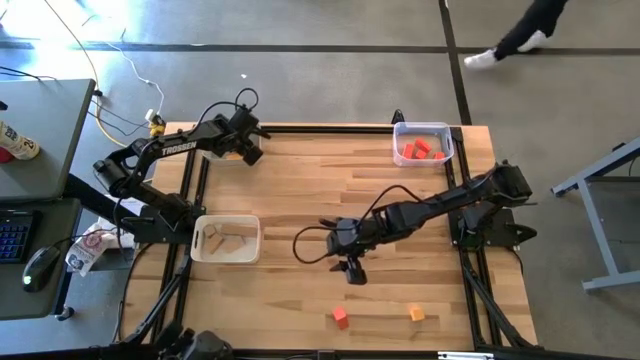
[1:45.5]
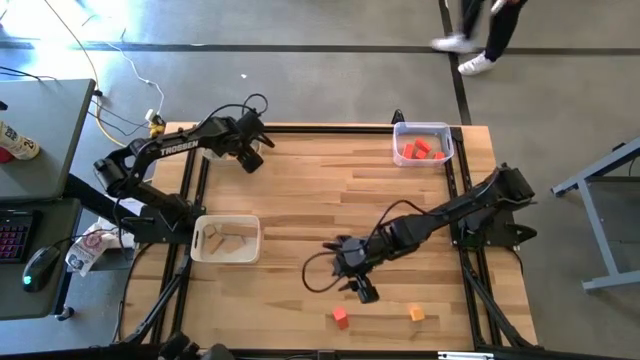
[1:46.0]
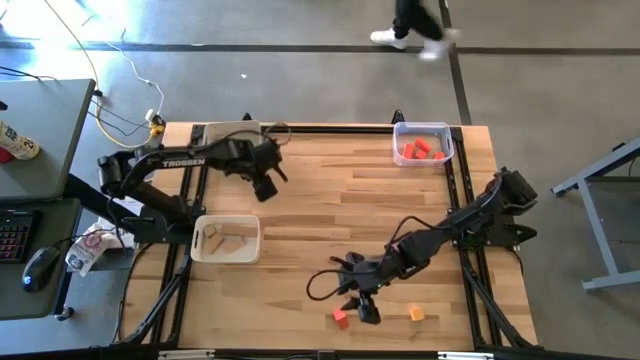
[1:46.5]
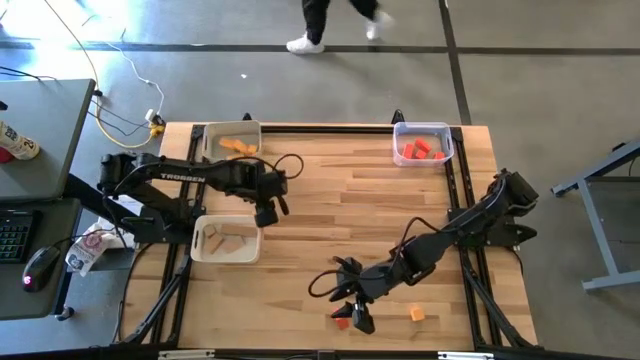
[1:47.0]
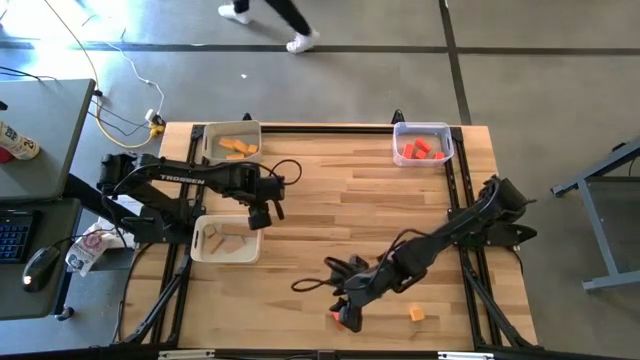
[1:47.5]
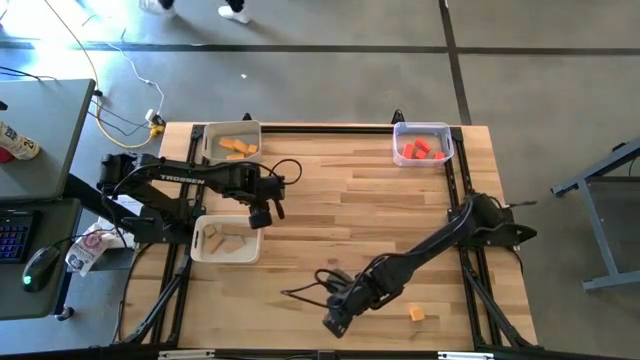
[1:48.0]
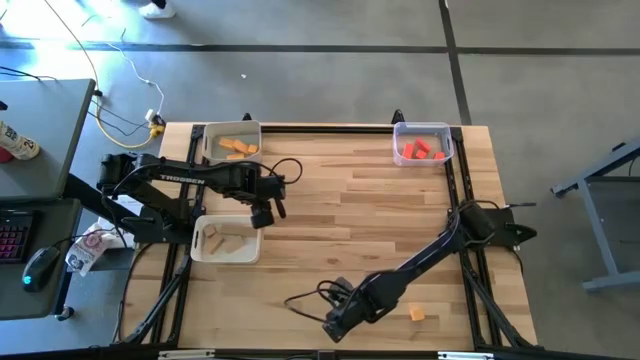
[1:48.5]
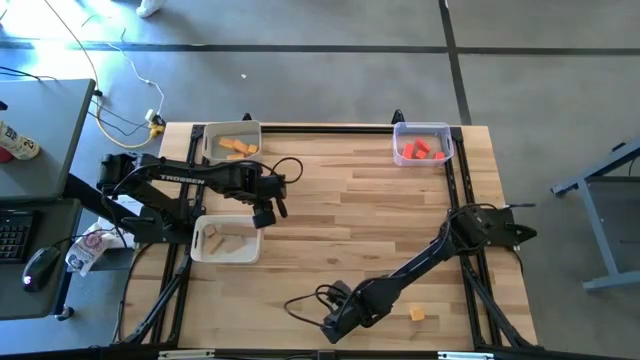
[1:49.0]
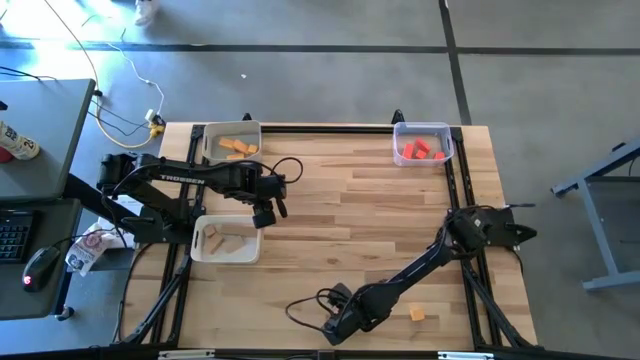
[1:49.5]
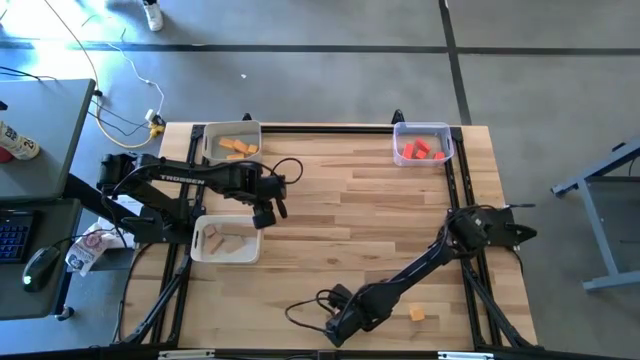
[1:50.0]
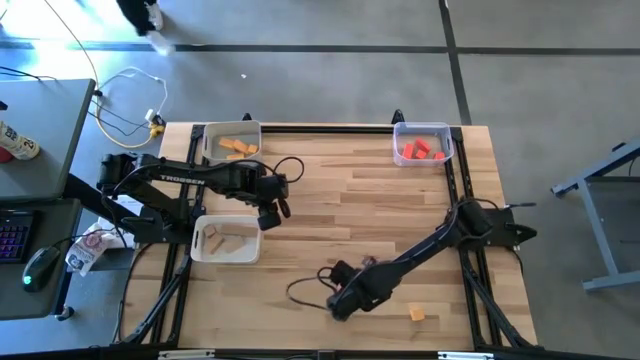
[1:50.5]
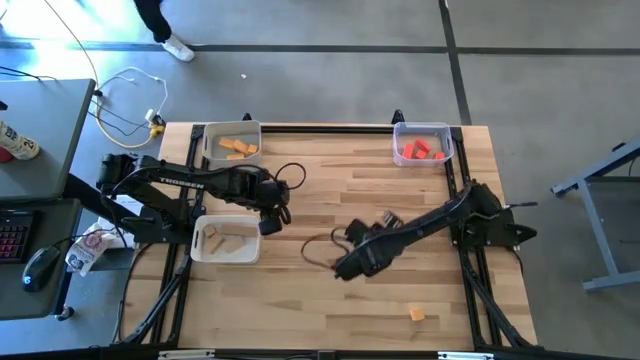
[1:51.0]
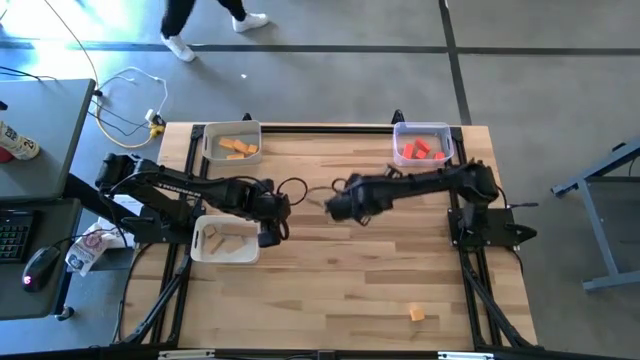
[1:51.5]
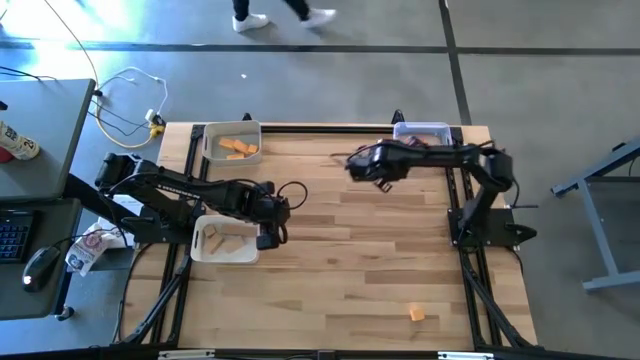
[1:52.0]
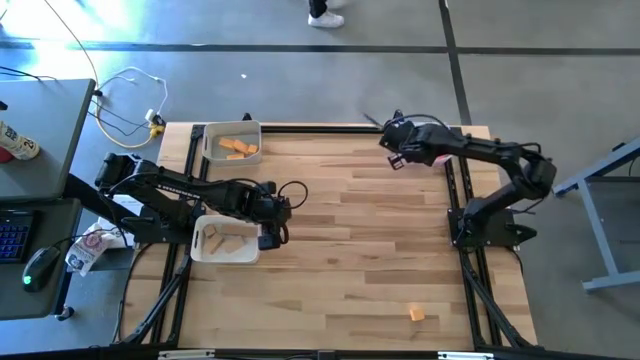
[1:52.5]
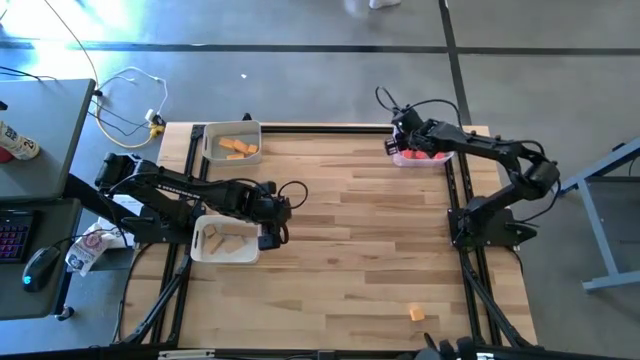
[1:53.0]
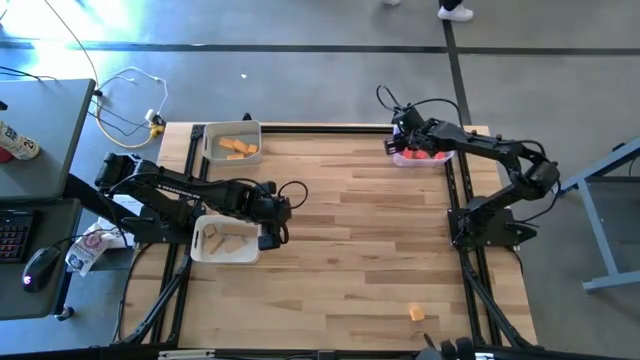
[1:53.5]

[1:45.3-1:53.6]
Task: Sort & place blocks by color
Put the orange block into the transparent bin

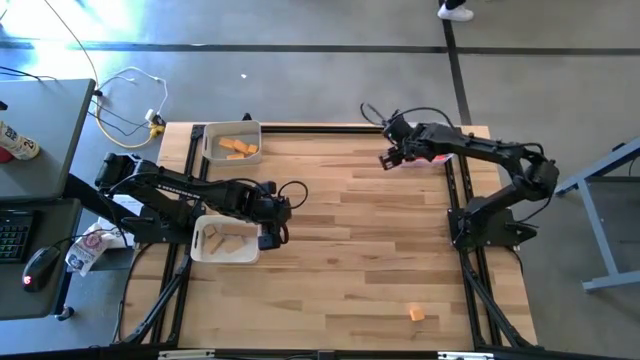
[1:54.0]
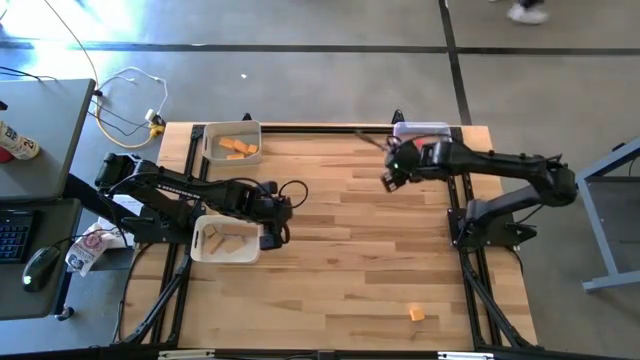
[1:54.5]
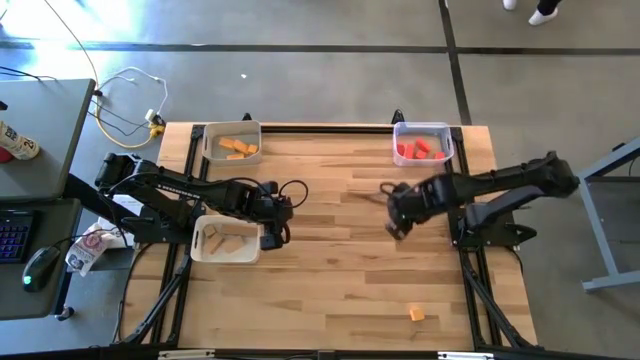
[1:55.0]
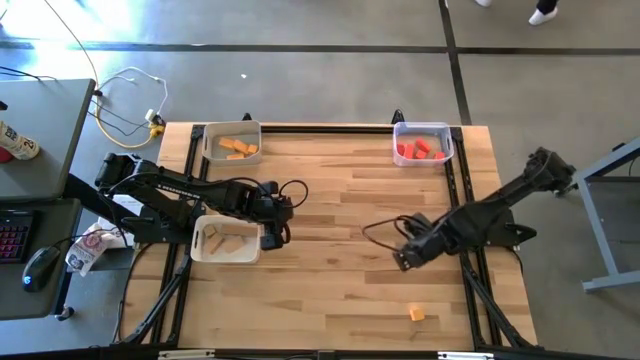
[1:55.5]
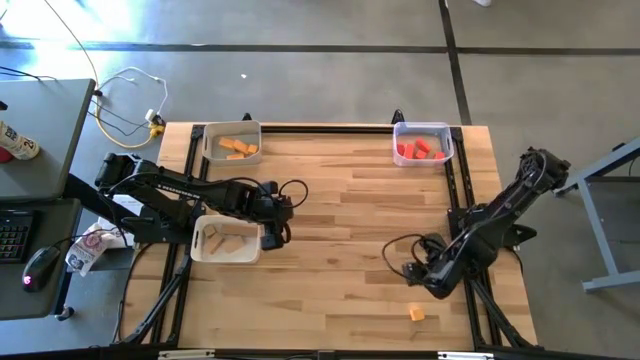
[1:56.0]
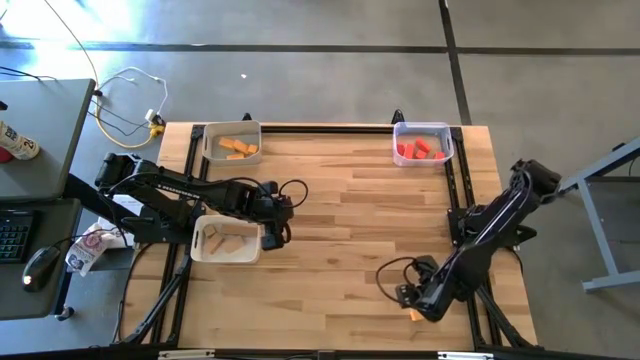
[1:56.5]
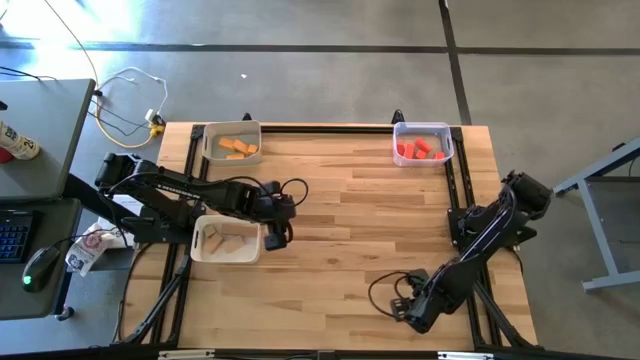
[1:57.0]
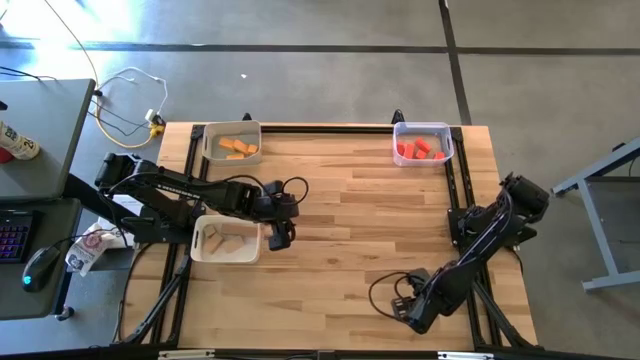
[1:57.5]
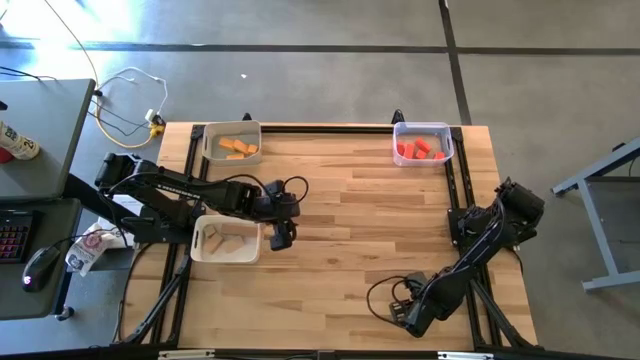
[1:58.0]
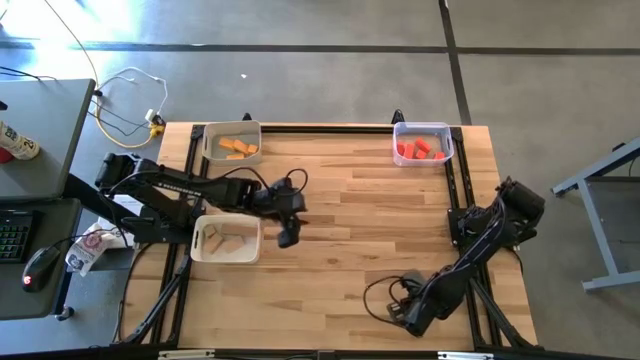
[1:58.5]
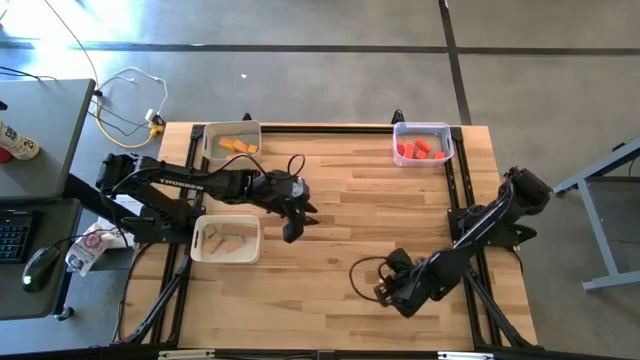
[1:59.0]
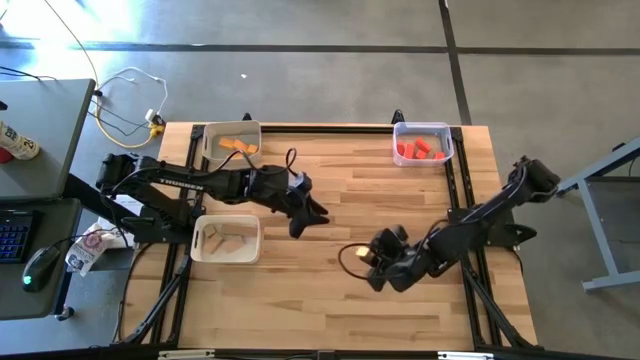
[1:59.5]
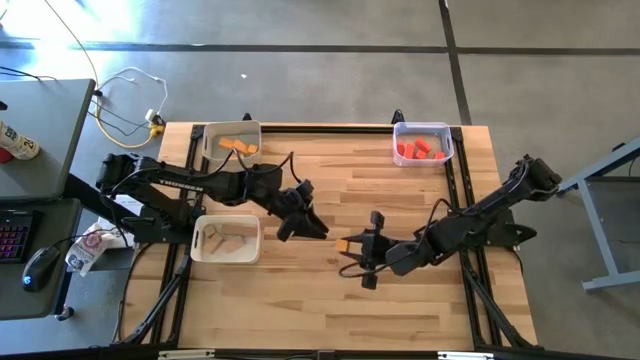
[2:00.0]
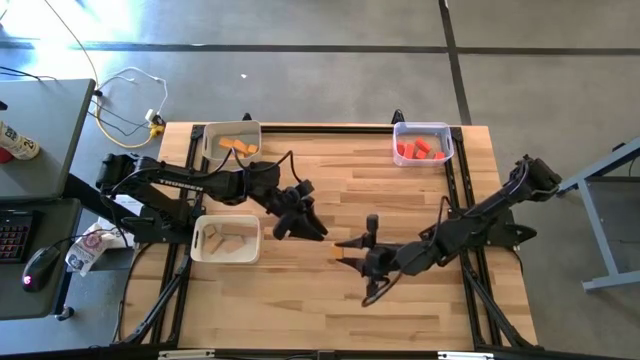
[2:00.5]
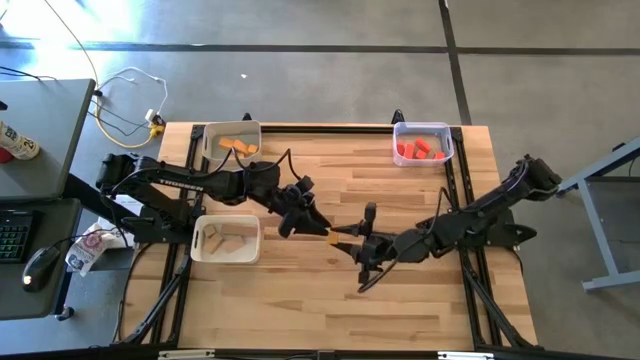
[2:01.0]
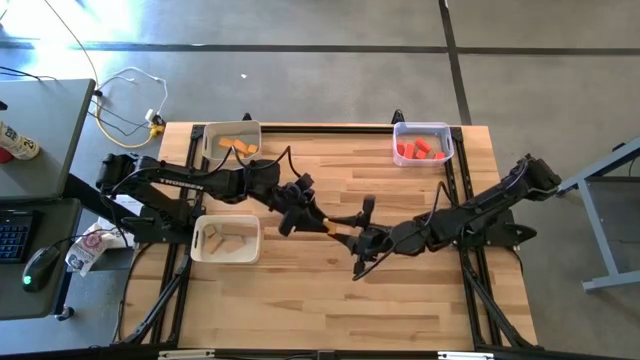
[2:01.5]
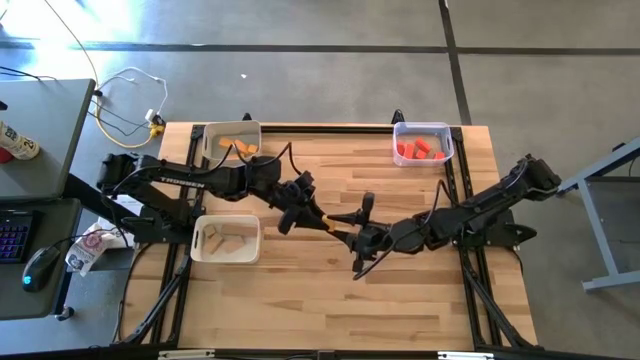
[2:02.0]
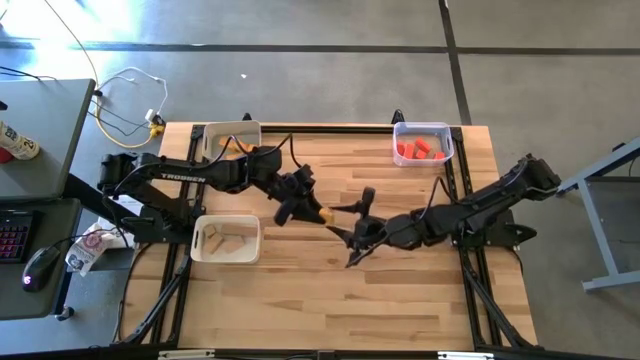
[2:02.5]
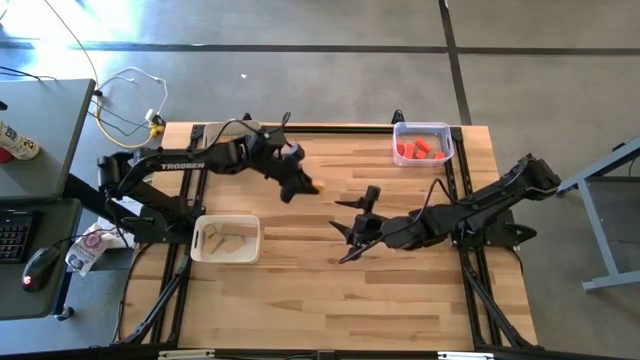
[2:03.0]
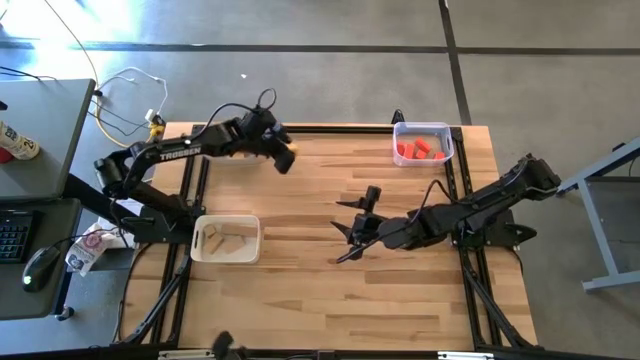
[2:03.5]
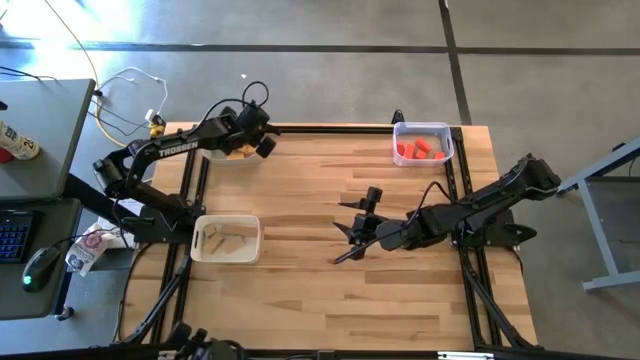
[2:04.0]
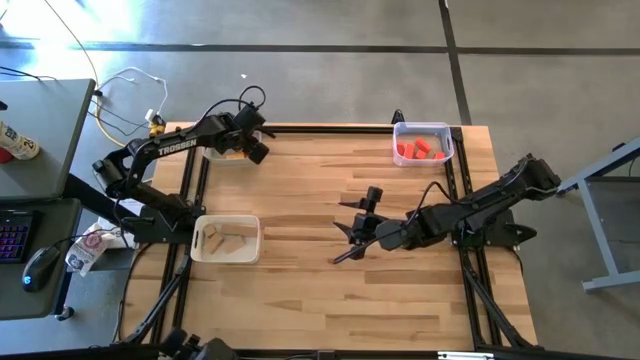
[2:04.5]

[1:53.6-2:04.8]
Put the yellow block into the gray bin

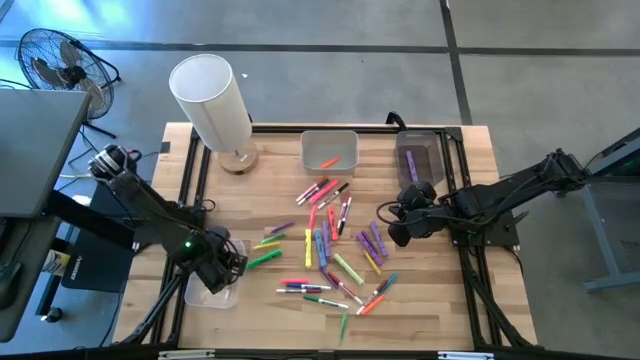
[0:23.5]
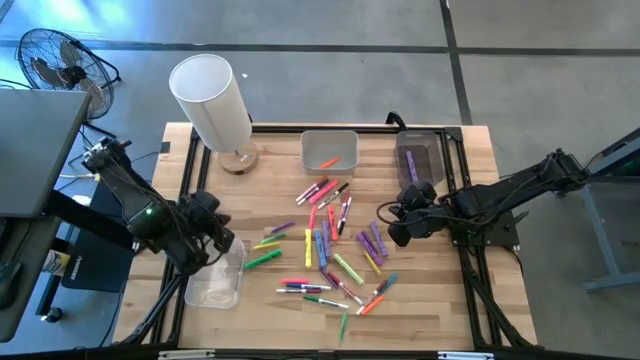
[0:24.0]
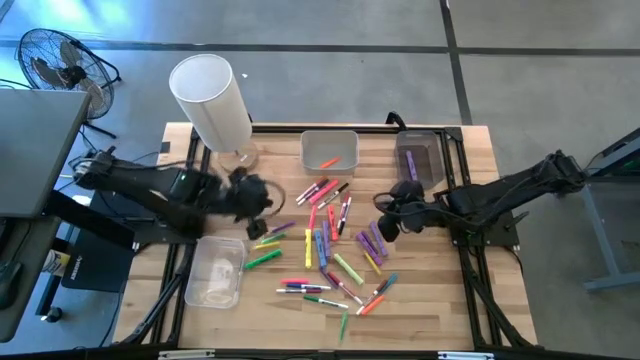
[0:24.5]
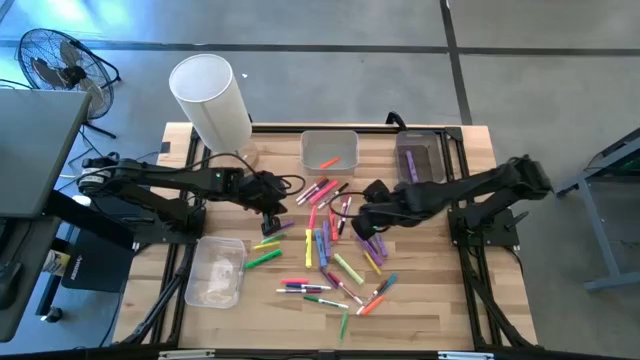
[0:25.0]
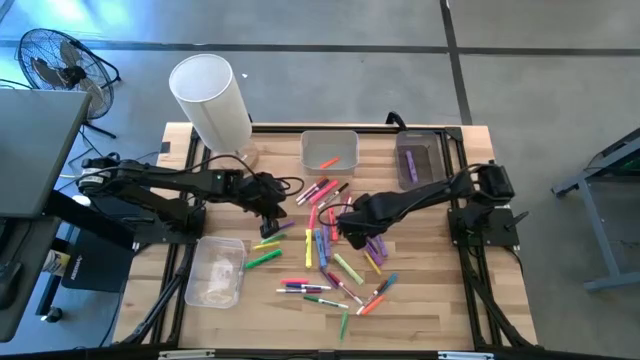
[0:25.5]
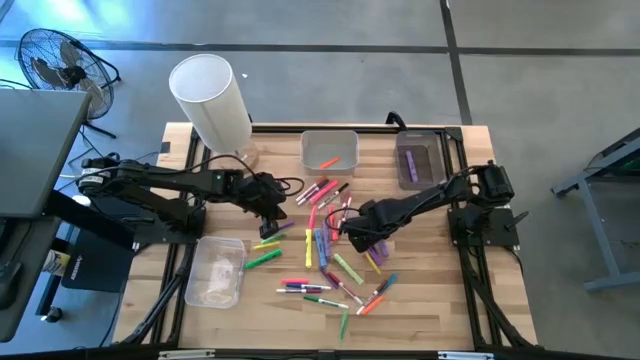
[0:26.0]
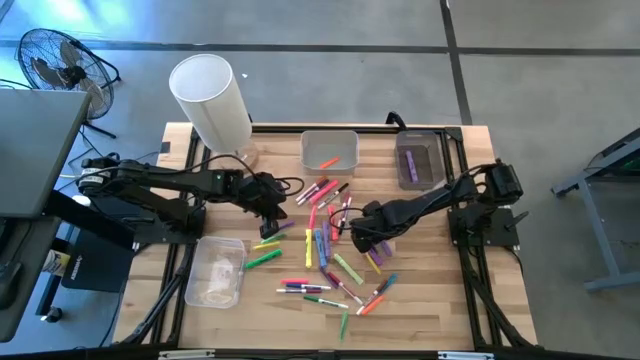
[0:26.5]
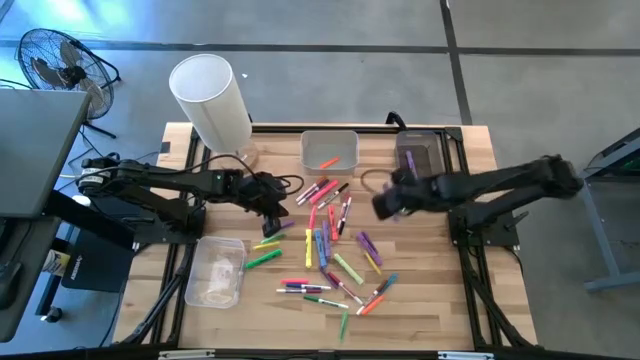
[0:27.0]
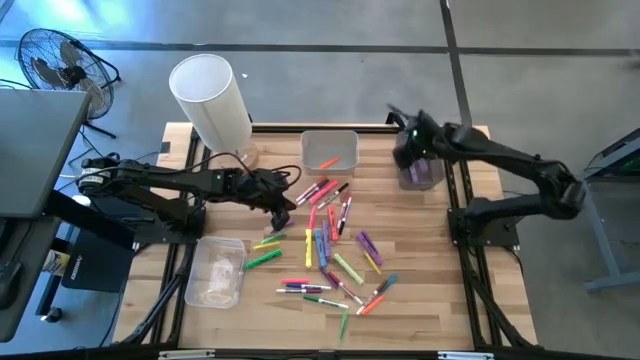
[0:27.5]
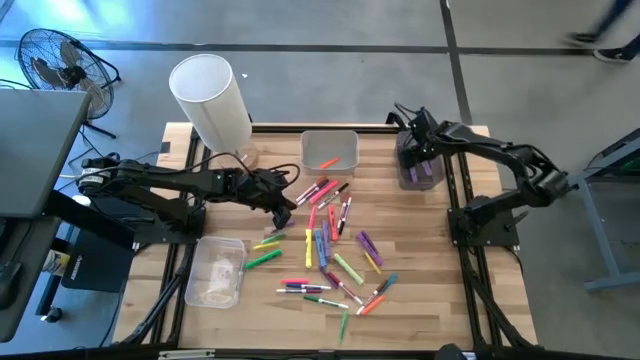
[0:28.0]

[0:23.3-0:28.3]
Task: Pick & Place Markers
Put the purple highlighter pen into the black bin
